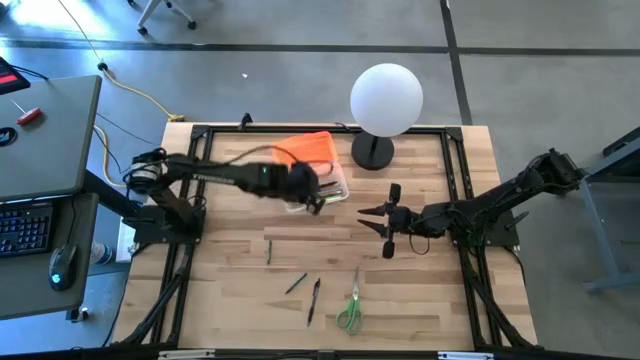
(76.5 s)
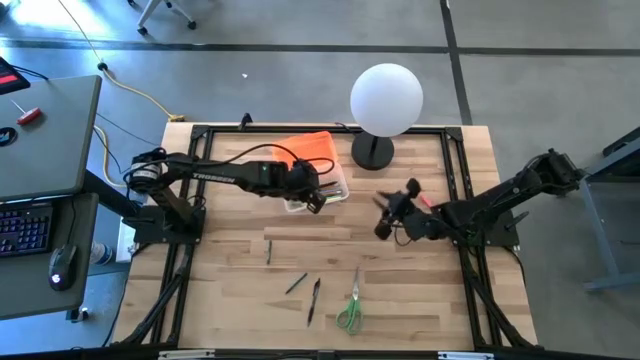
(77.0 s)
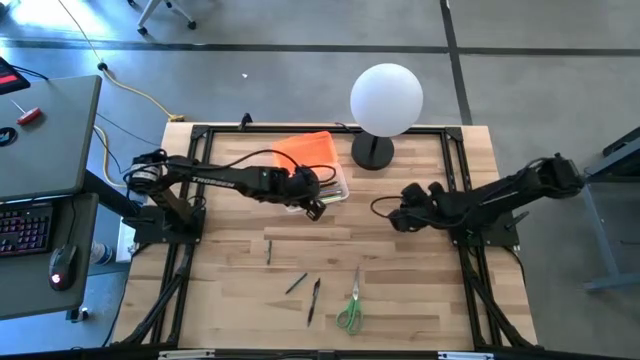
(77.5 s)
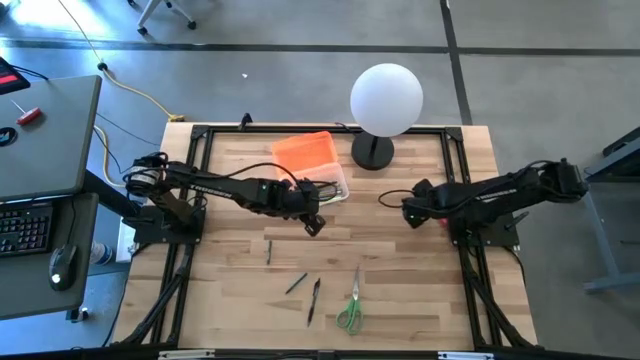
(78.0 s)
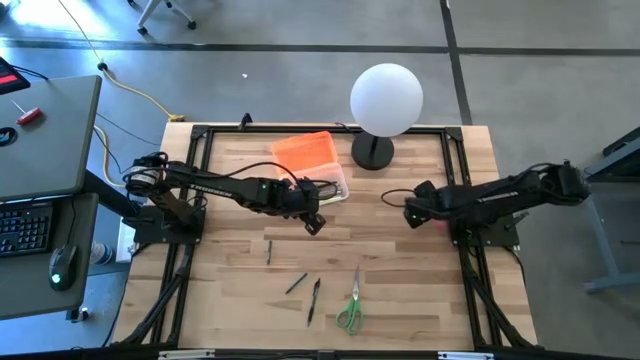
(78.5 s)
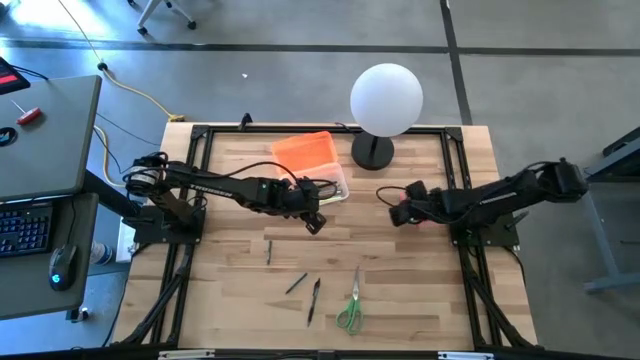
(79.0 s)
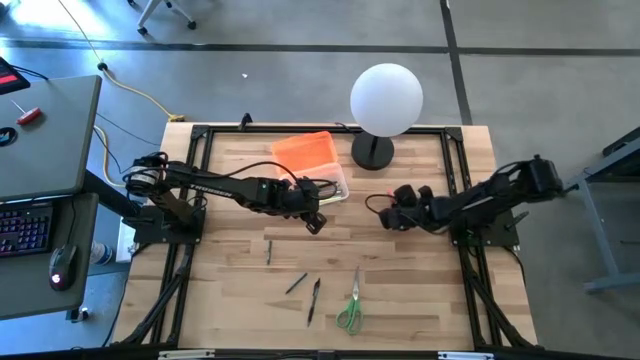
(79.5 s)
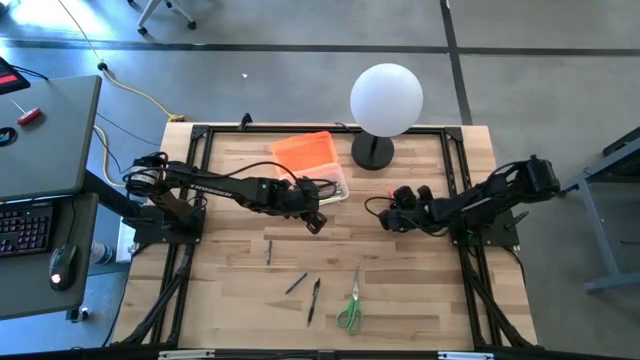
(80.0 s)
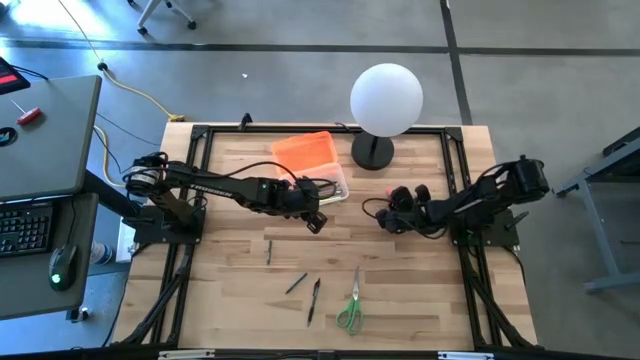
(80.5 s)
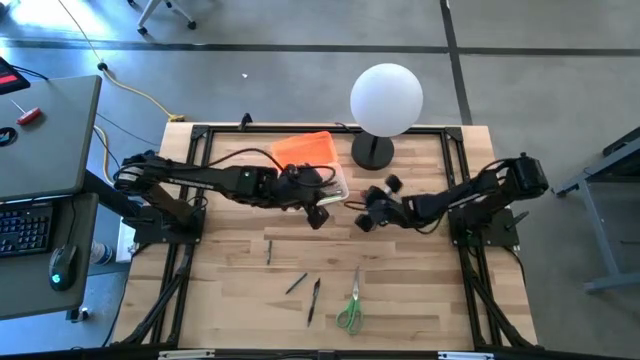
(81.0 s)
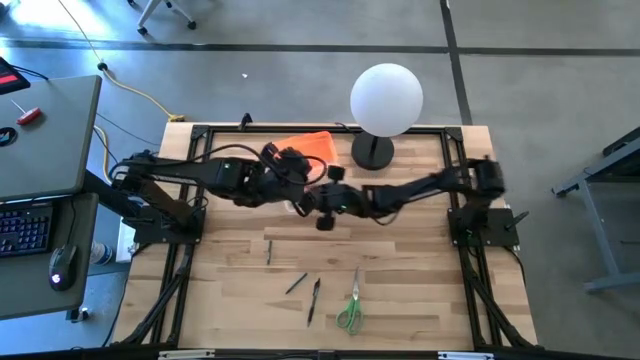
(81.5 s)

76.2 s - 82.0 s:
Task: Pick & place school supplies into a supply box
Put the pink pen into the transparent supply box

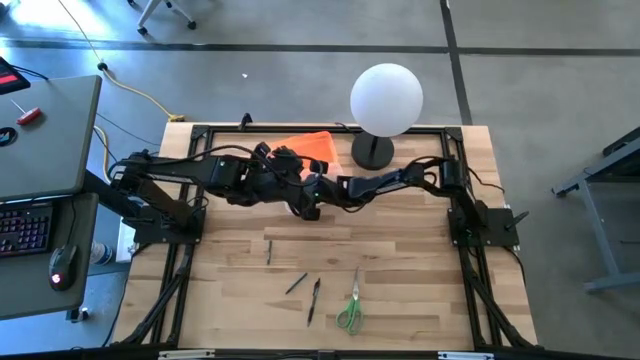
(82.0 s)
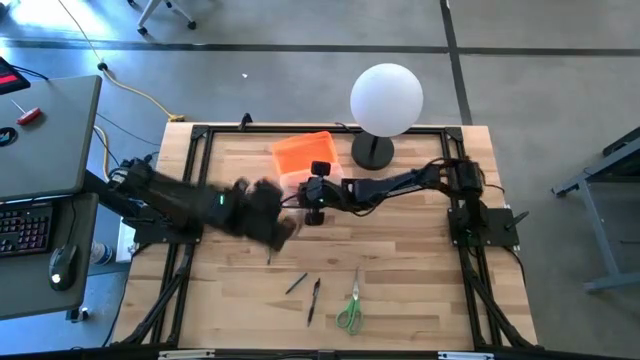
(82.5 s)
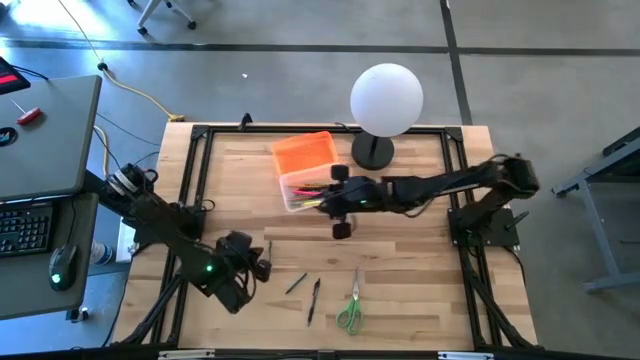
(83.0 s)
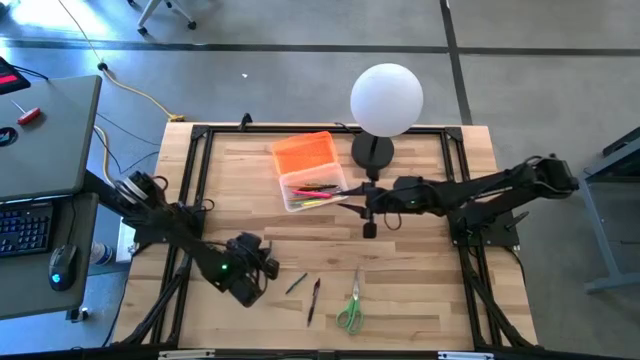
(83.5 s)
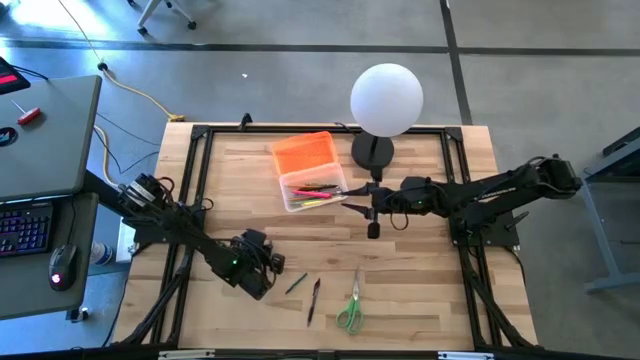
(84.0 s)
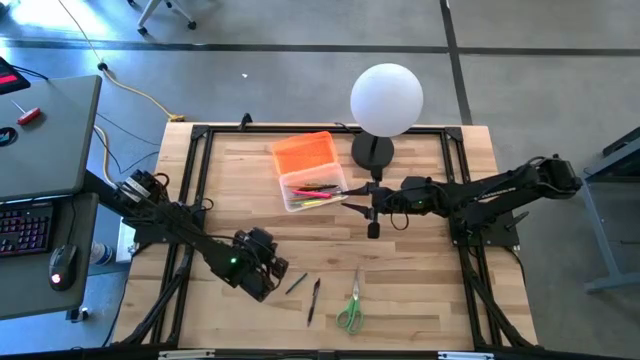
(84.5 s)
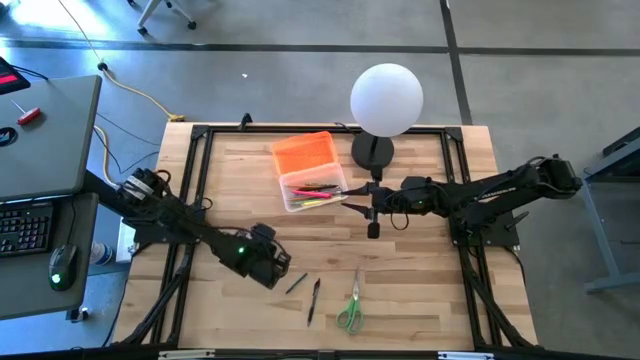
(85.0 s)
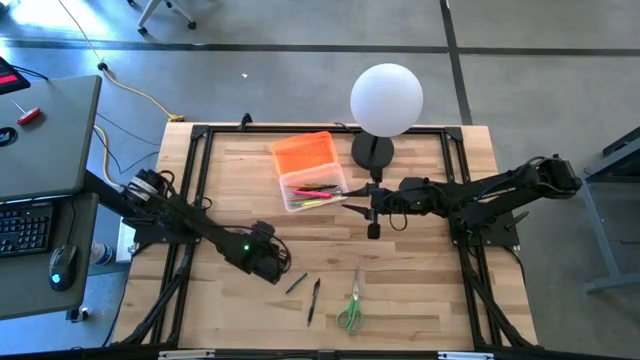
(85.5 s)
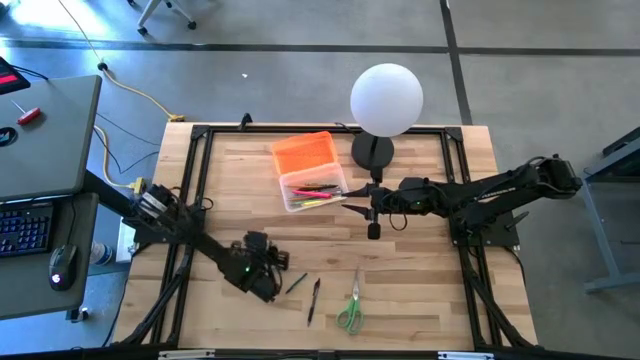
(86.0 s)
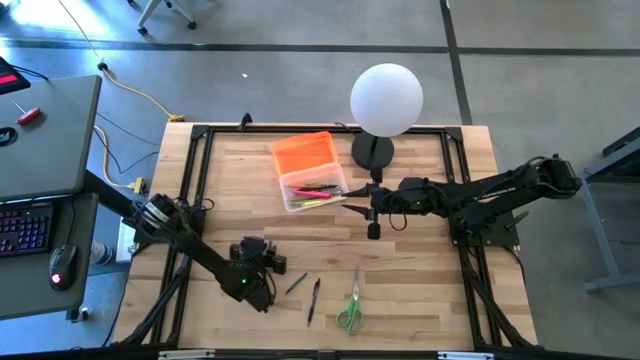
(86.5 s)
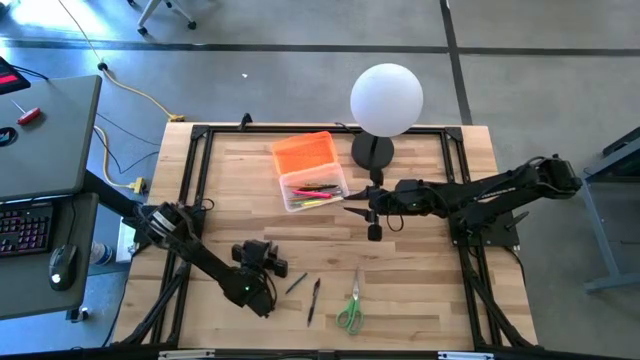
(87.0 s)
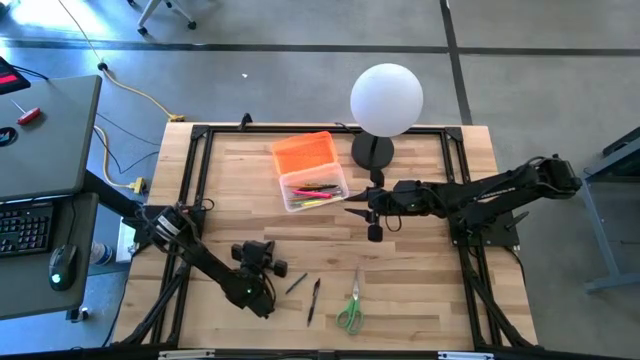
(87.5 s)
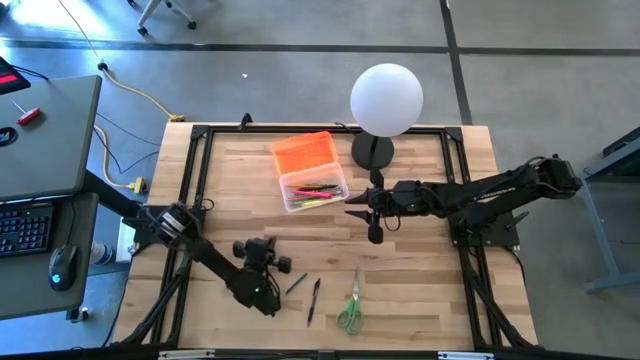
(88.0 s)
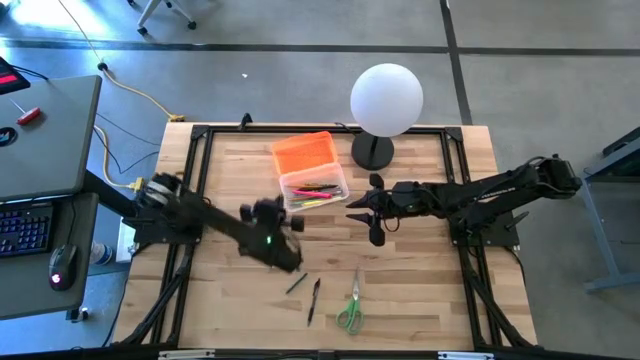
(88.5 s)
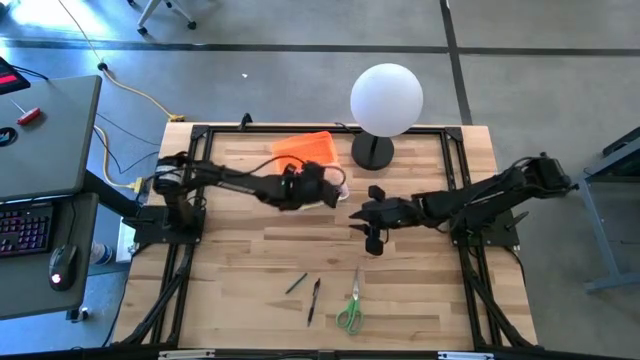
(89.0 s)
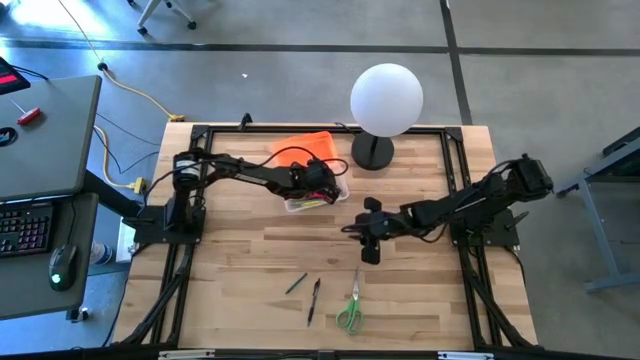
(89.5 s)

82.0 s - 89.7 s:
Put the top green crayon into the transparent supply box

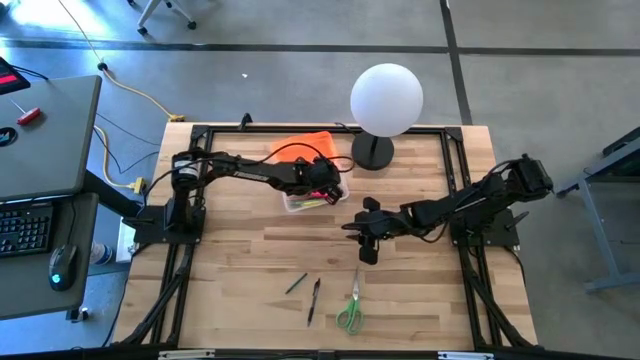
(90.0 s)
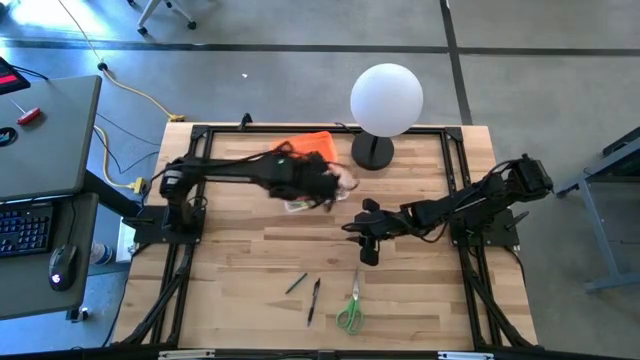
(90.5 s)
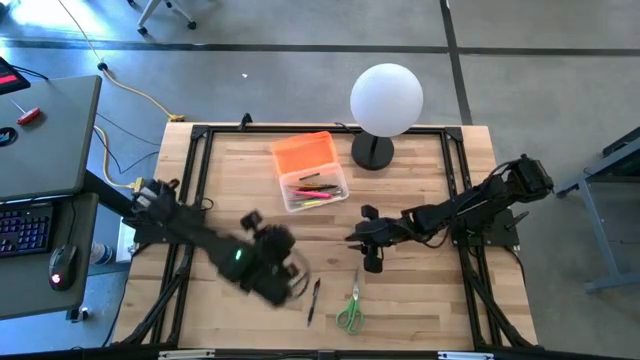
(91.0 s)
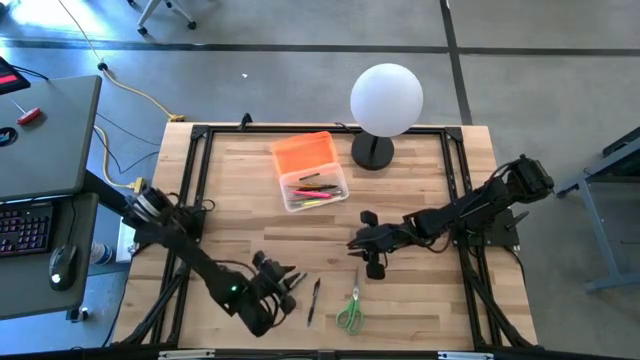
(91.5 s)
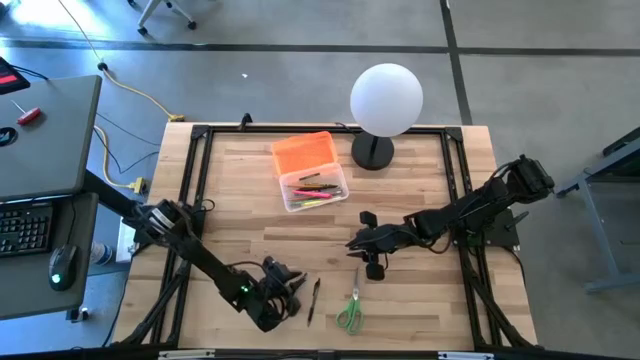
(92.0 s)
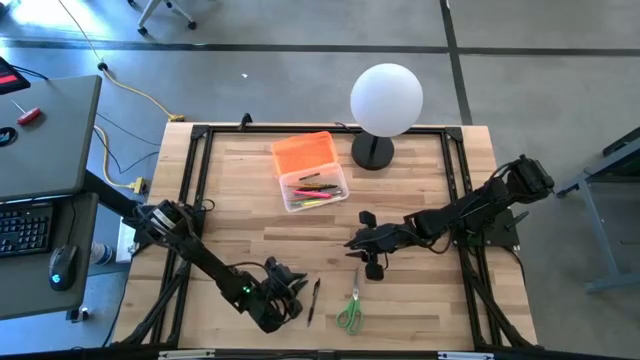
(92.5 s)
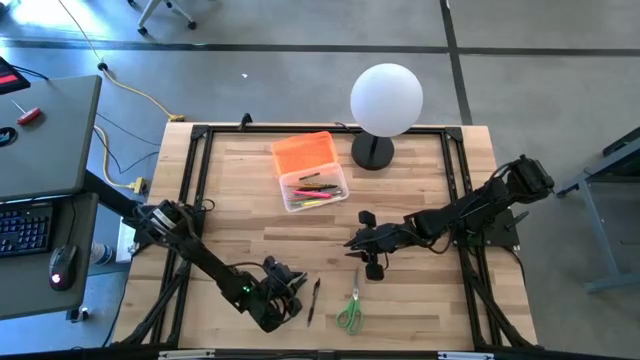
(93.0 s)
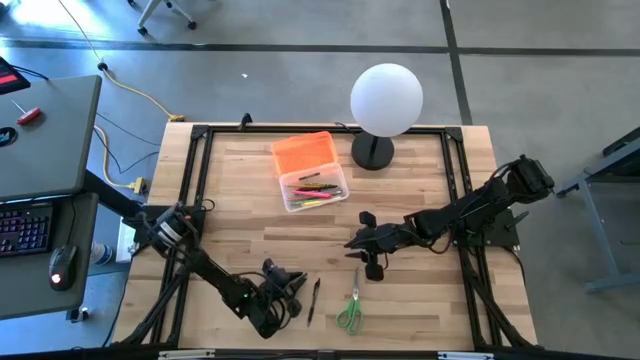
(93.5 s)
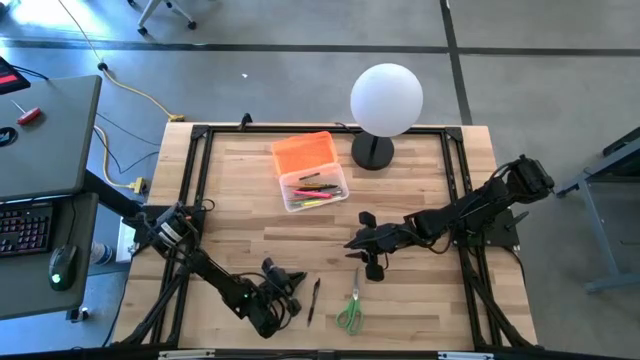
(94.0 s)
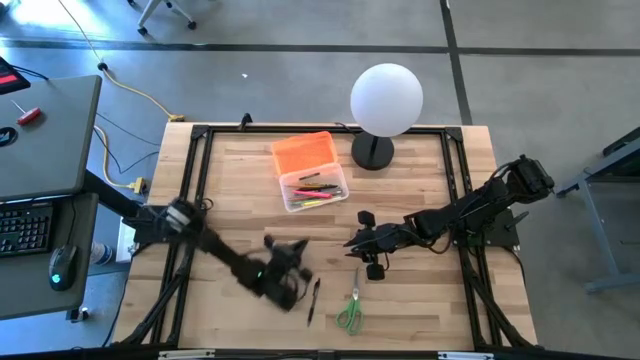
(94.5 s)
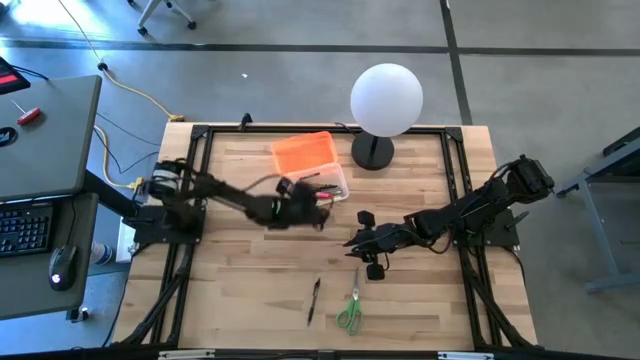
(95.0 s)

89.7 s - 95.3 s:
Put the green crayon into the transparent supply box

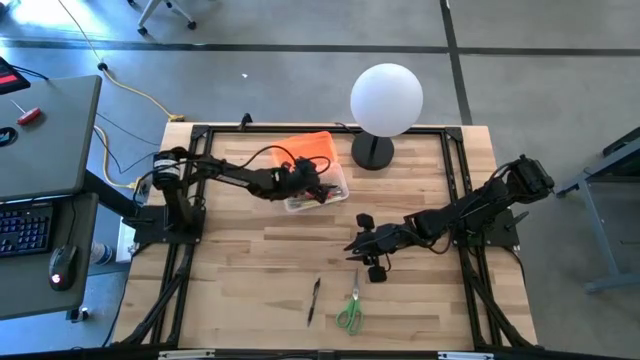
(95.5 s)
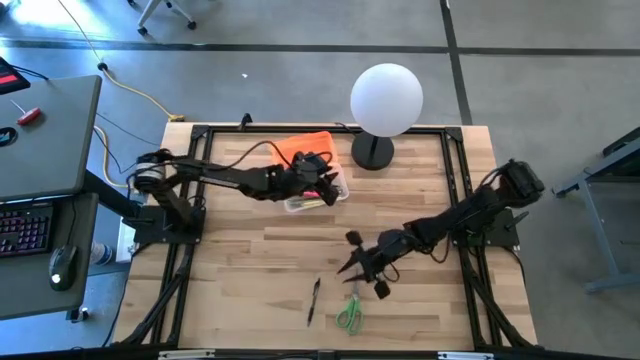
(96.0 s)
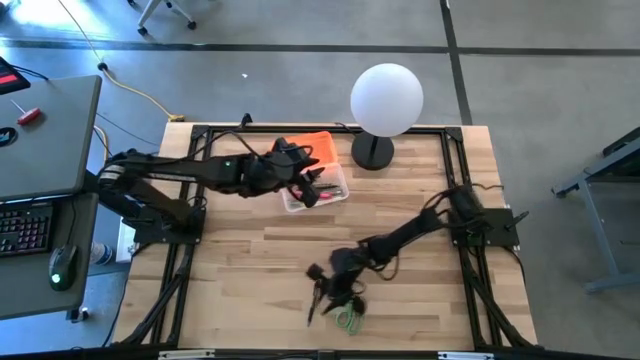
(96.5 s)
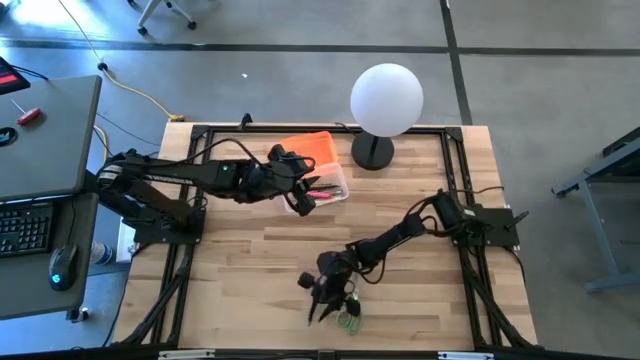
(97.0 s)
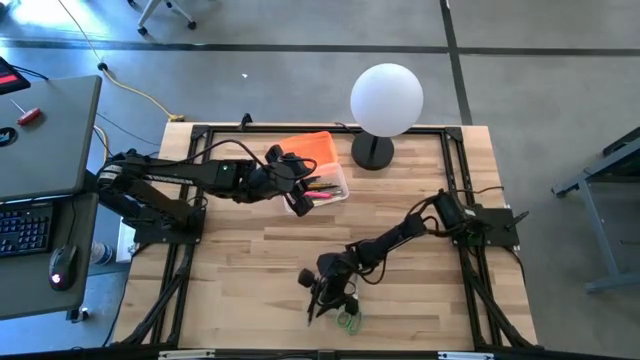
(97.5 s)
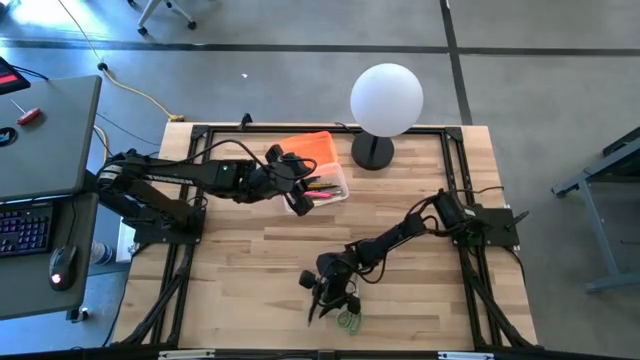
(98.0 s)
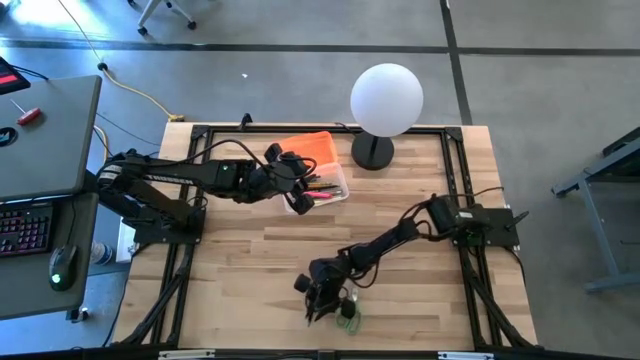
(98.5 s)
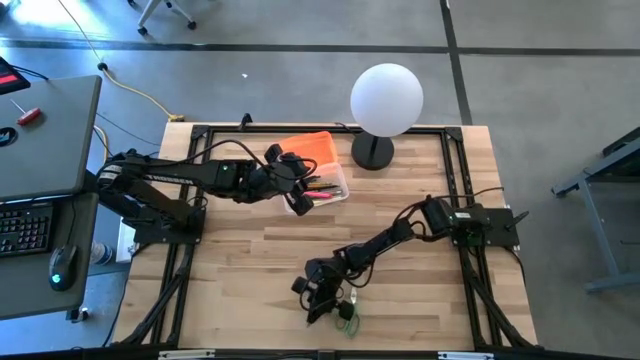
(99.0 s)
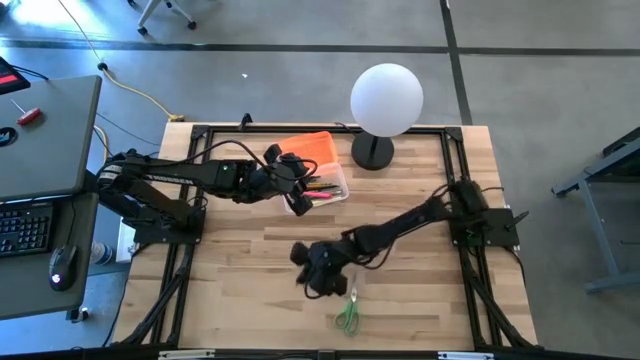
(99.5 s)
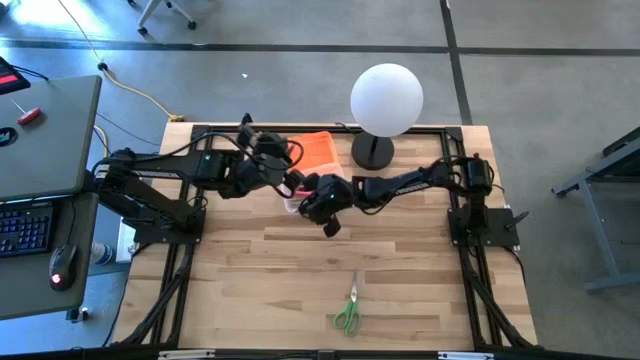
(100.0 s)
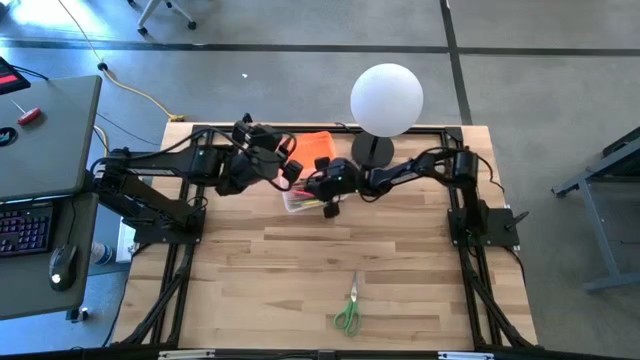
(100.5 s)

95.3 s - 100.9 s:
Put the transparent pen into the transparent supply box
